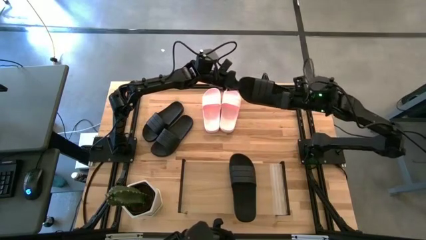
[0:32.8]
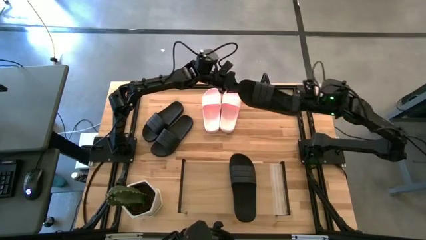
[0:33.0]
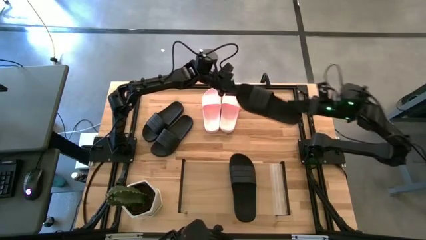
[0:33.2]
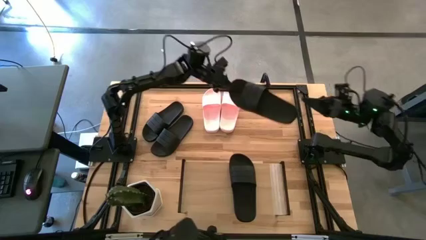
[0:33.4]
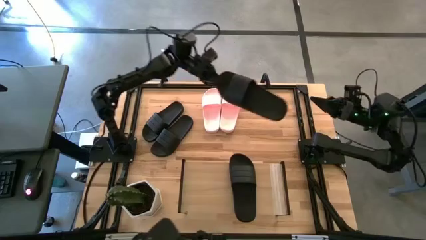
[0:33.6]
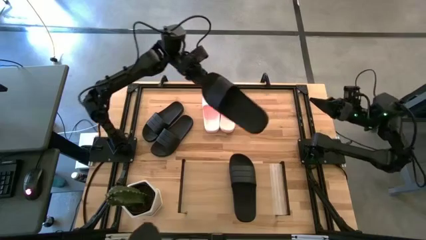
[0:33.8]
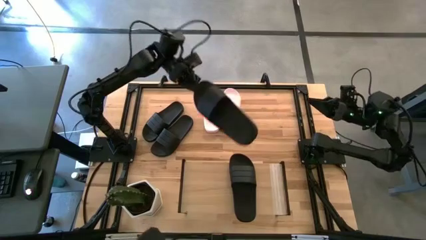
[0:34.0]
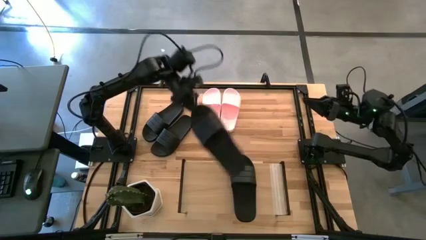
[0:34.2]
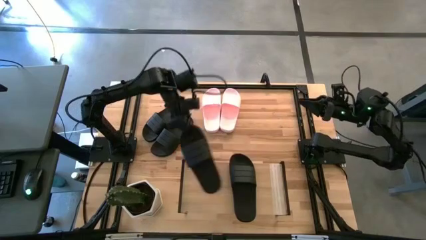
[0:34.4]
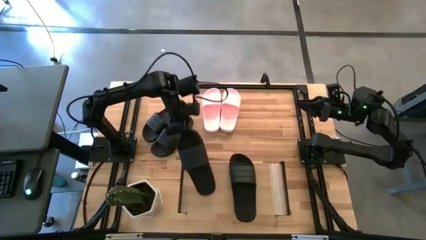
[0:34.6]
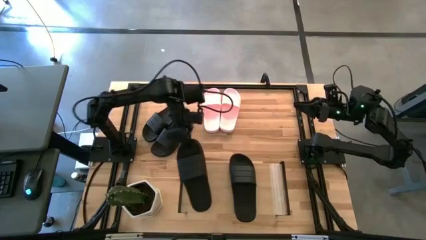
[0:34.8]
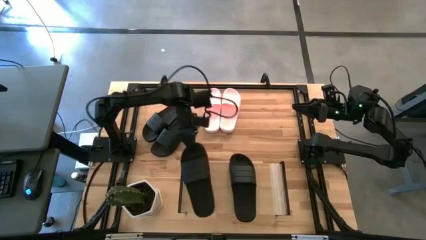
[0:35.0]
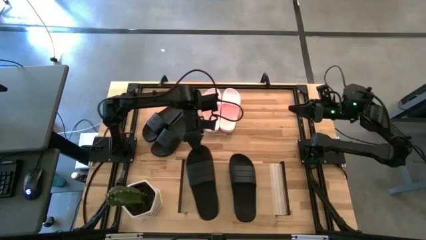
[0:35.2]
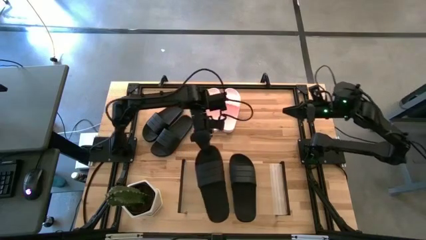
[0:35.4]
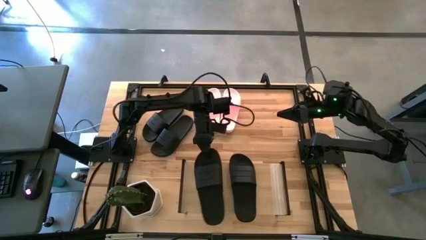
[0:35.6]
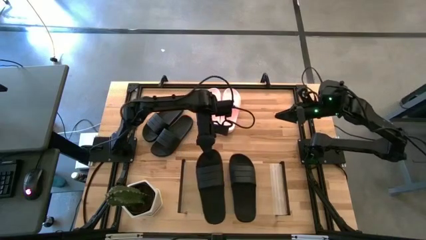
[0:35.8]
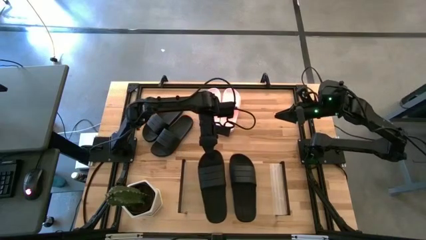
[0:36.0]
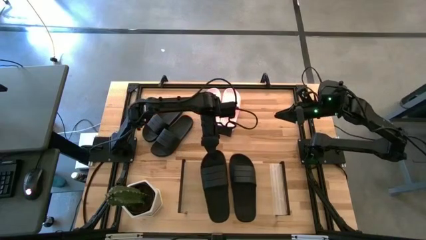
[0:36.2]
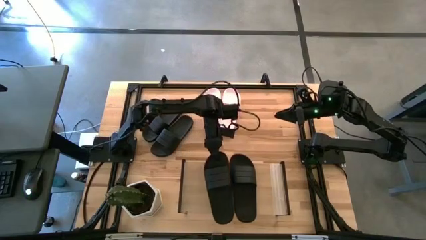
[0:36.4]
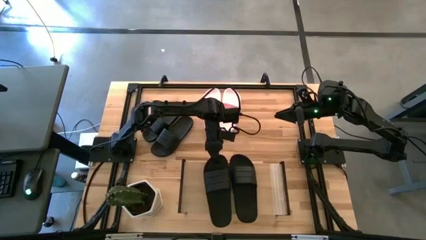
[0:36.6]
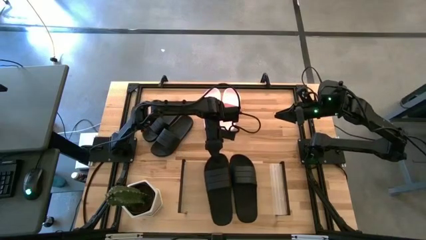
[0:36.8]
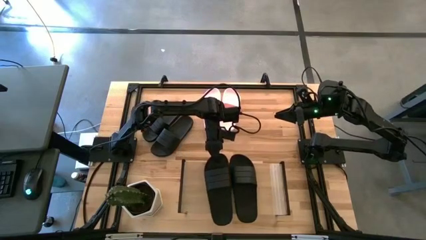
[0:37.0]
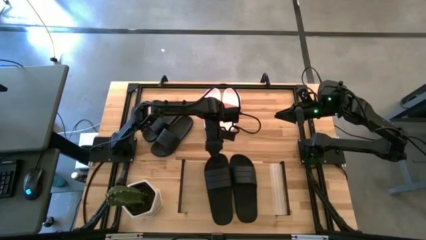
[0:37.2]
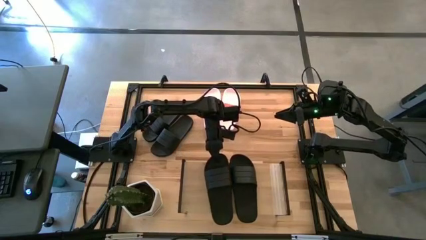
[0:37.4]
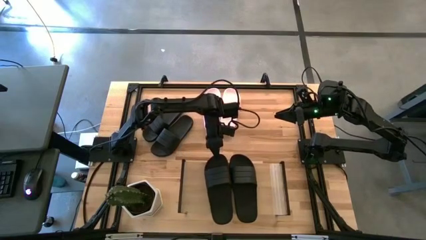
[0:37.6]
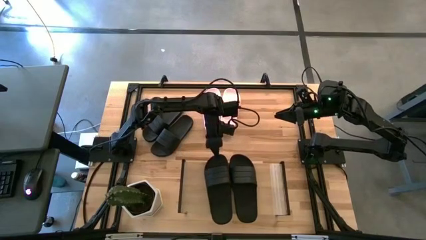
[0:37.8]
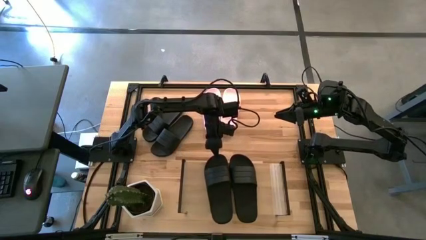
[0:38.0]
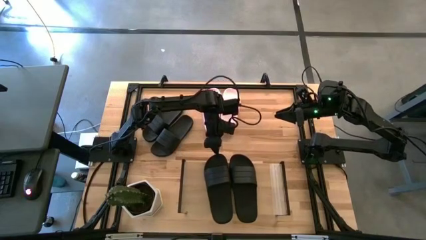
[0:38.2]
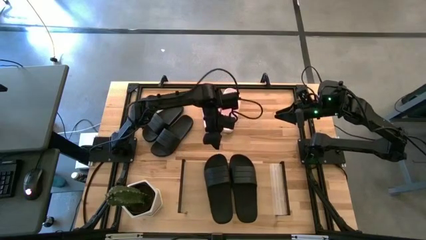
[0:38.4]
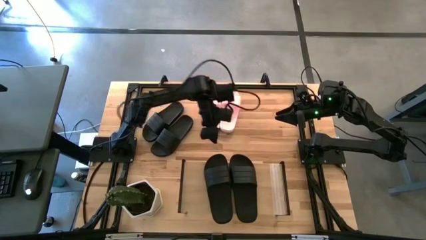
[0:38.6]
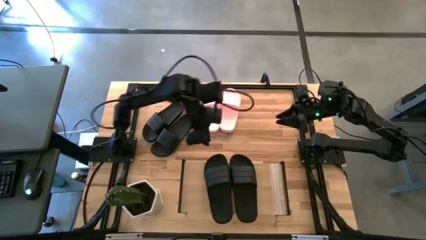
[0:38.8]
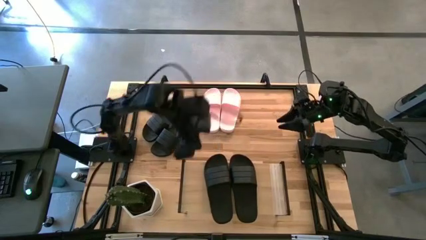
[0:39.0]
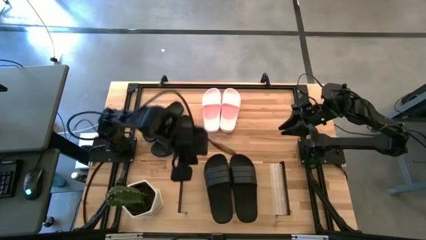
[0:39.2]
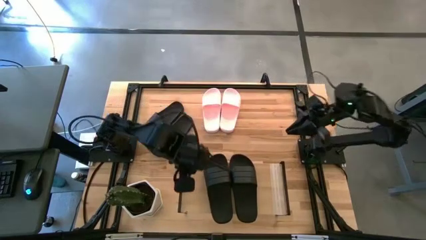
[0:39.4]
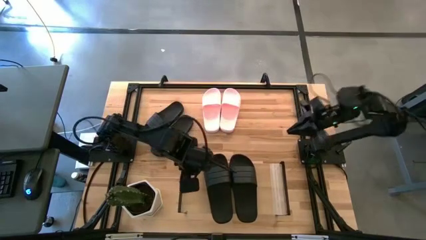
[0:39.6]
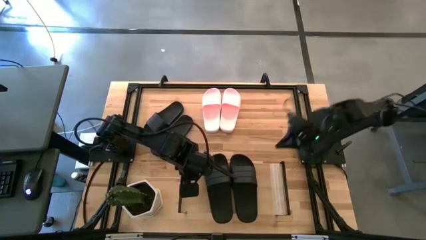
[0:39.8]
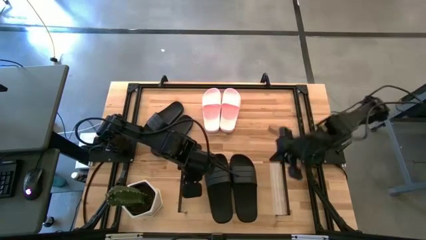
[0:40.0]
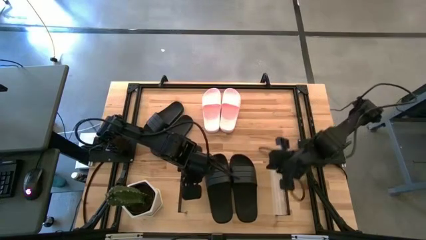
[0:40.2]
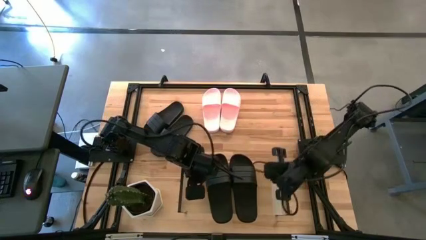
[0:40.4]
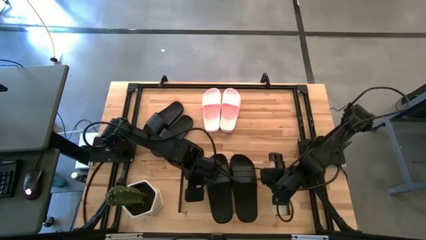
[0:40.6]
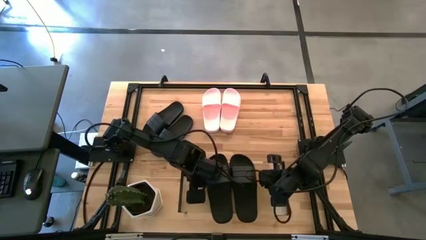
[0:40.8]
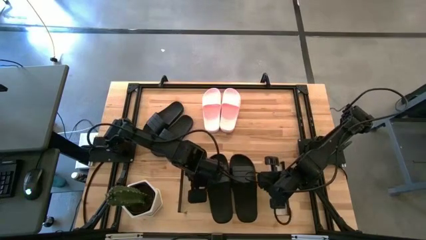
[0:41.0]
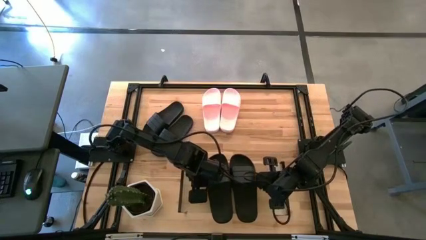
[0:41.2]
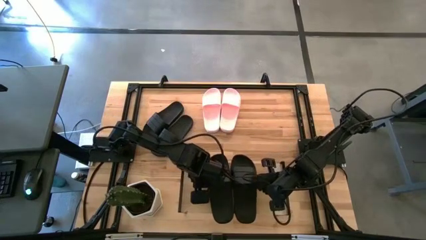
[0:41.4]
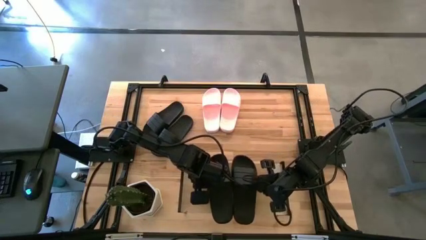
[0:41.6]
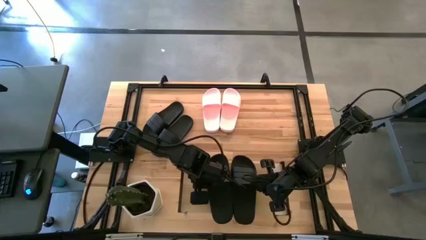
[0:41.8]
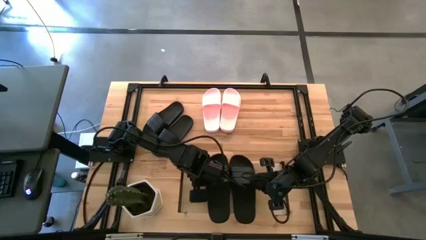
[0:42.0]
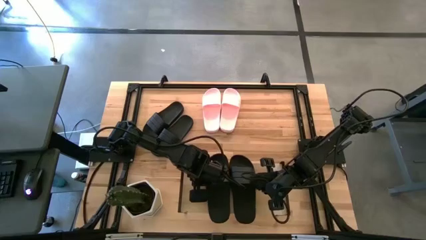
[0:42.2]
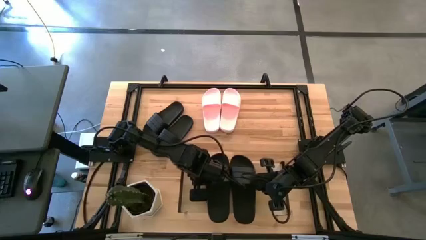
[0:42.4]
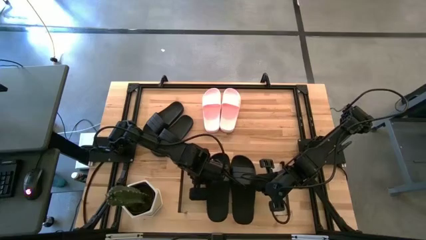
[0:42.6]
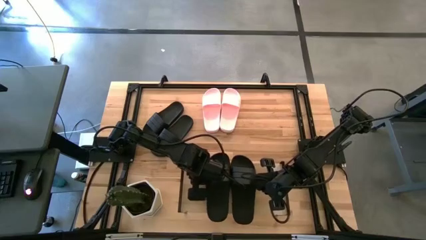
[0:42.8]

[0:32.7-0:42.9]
Task: Pick and place slides into the shelf
Put the black slipper on the shelf
